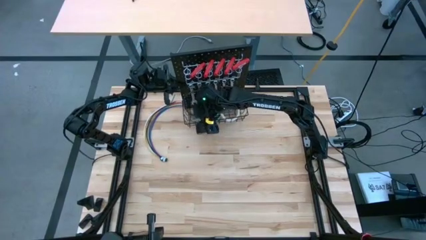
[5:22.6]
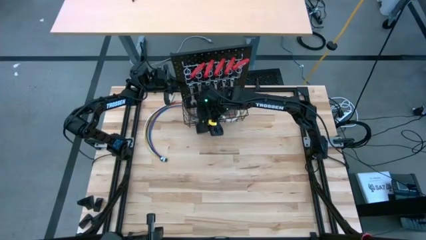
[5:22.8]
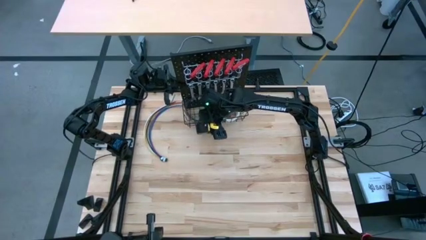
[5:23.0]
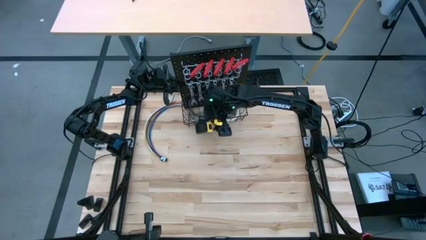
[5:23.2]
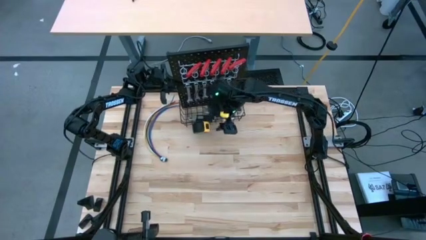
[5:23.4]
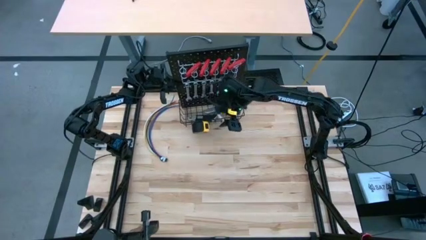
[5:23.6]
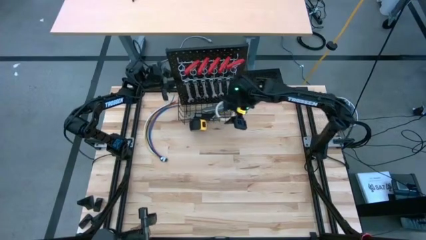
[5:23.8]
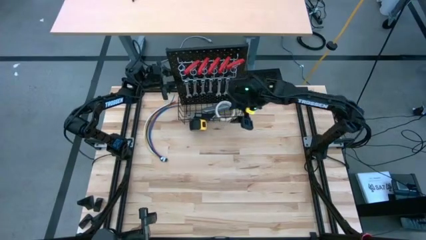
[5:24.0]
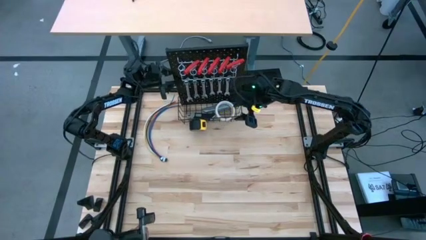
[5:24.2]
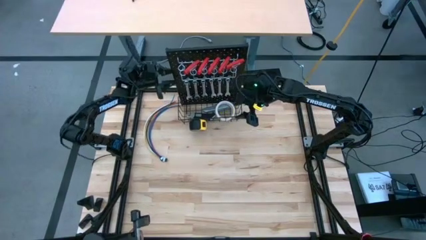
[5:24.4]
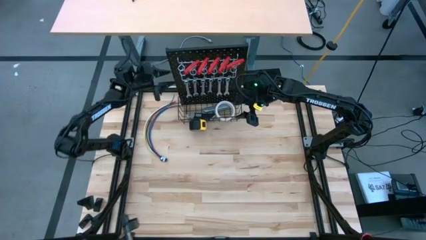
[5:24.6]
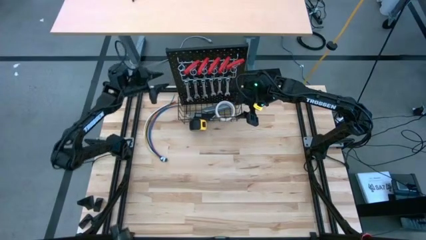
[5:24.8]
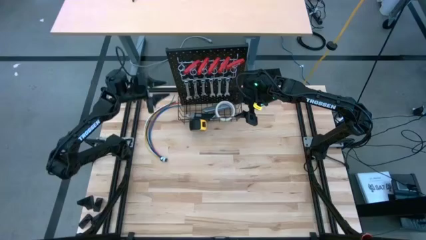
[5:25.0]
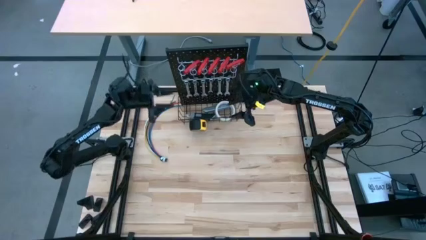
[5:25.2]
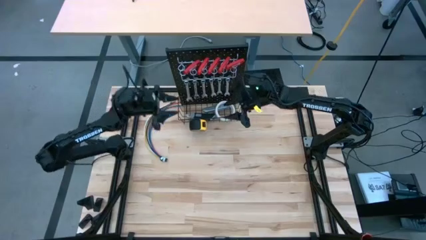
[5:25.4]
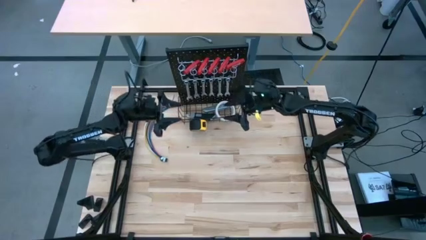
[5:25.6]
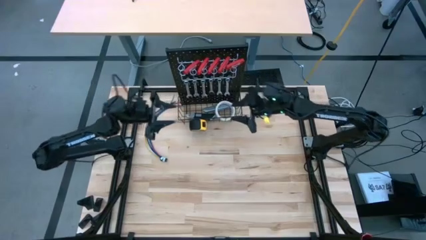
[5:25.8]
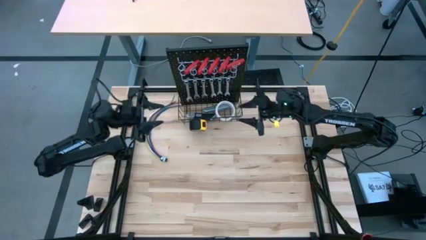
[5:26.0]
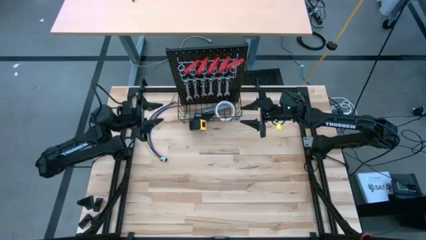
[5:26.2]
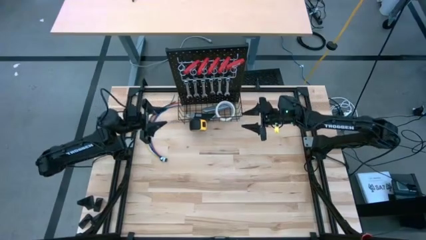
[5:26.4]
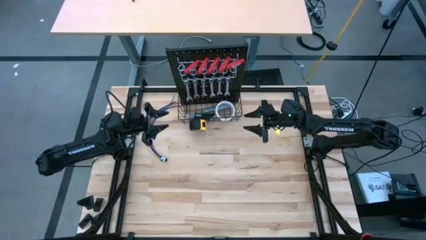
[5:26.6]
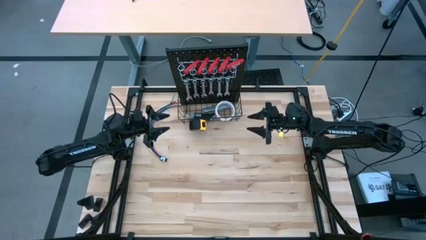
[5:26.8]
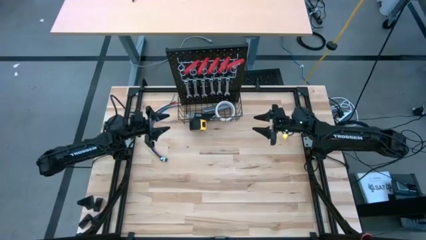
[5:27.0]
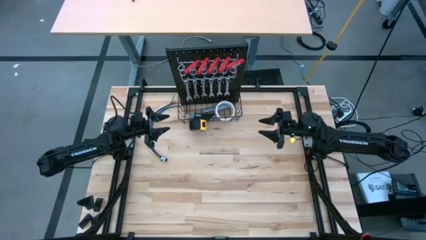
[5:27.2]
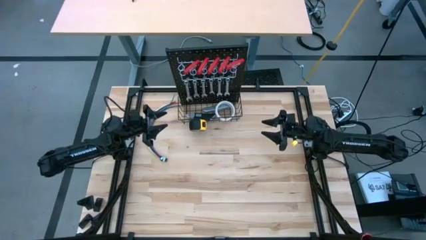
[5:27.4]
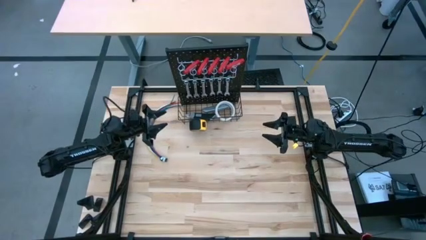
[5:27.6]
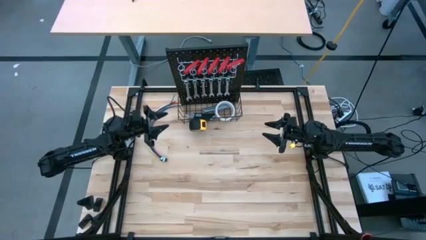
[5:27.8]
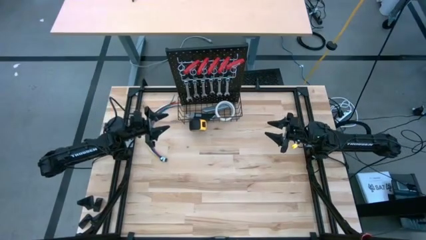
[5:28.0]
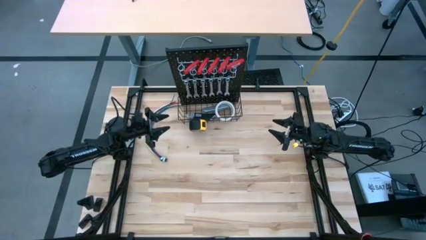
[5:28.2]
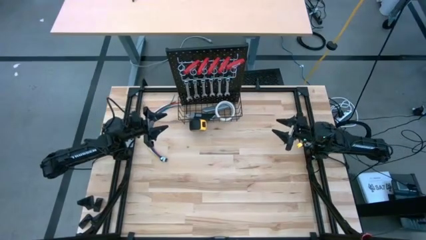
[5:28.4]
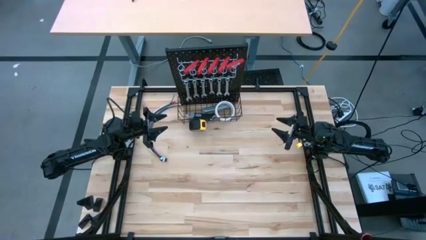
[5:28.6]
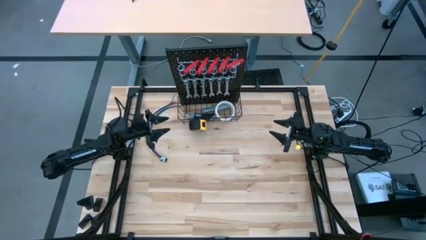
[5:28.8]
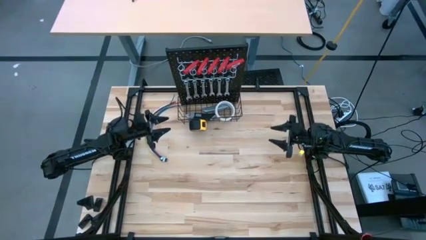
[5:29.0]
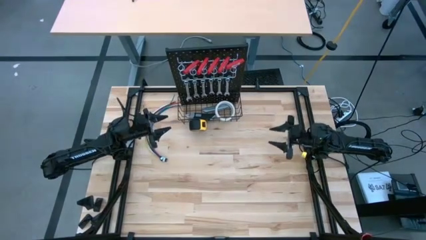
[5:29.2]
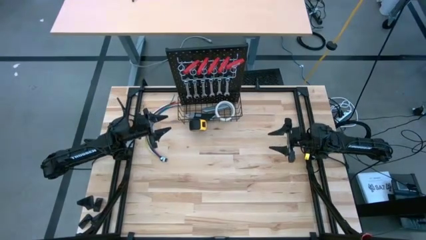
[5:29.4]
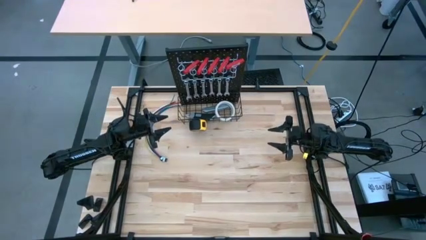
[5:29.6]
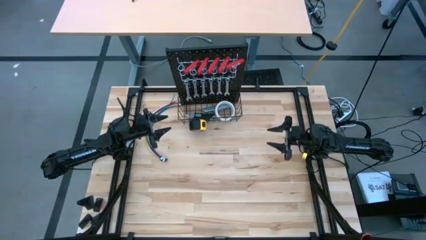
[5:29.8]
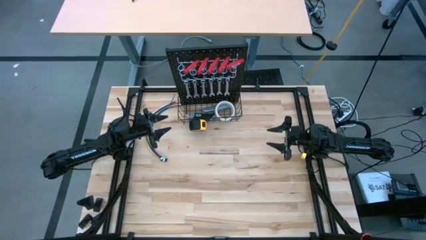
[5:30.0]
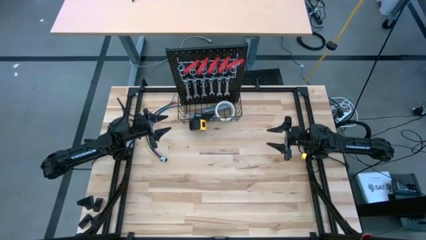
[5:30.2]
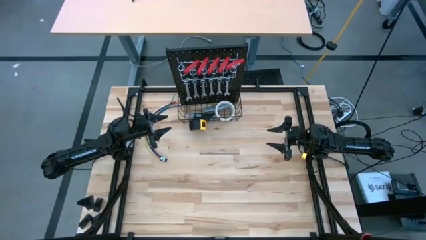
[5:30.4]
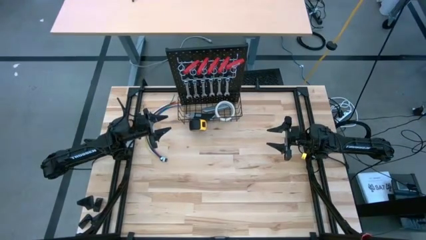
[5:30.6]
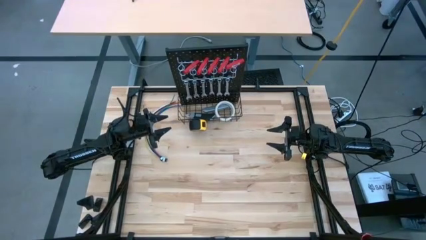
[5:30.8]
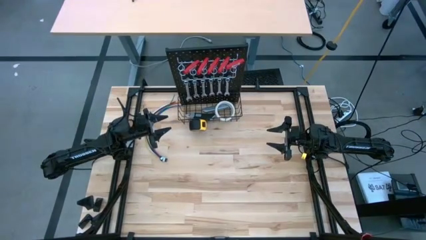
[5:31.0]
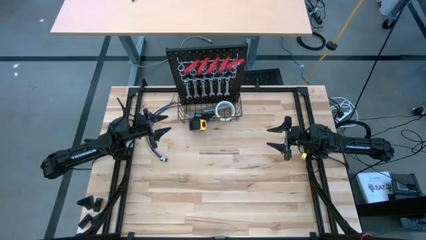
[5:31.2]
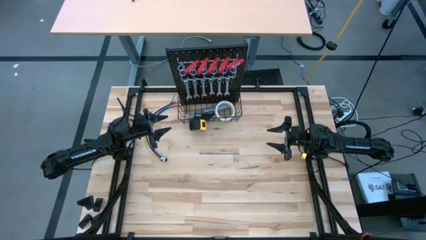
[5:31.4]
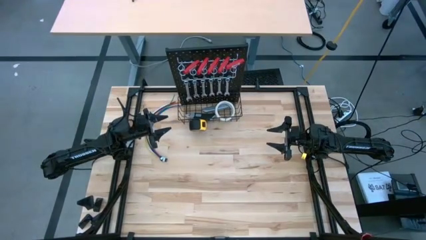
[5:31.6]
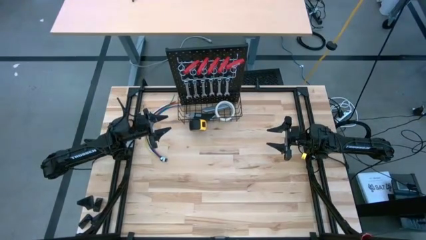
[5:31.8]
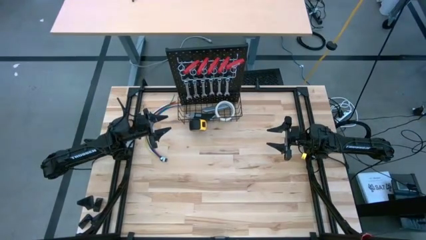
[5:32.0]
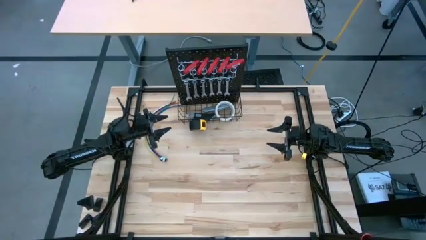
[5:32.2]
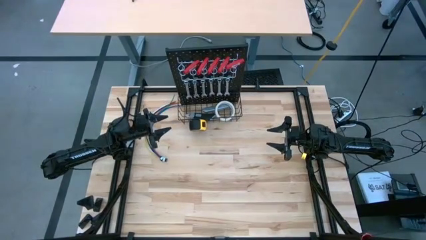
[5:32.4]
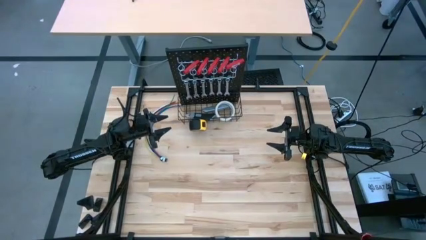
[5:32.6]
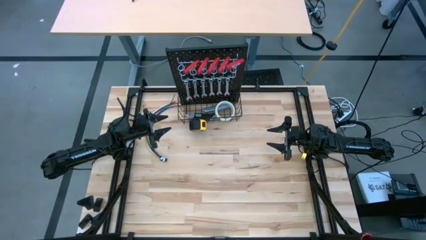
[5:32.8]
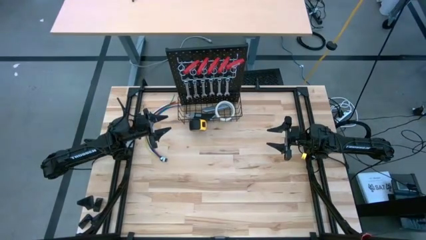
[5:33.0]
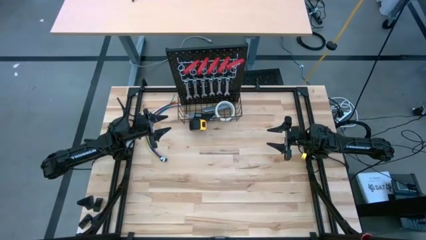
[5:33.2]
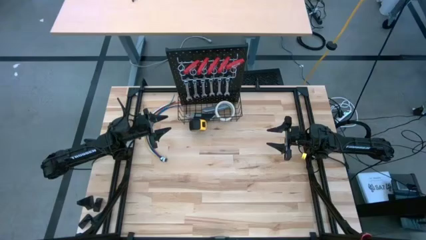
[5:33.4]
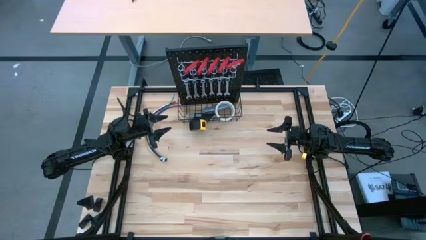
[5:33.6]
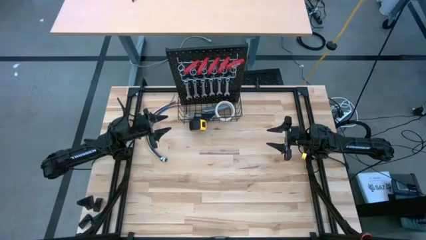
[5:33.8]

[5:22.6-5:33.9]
Task: Hang tools onto peg board
Return to Home Position

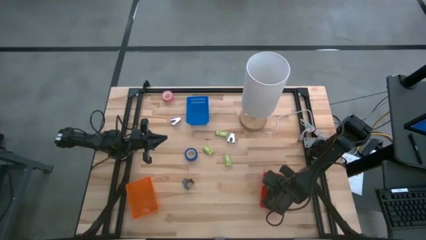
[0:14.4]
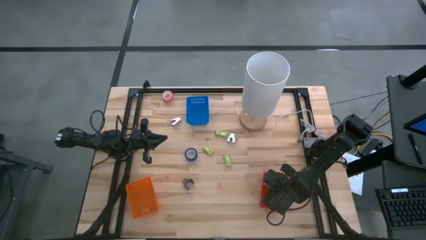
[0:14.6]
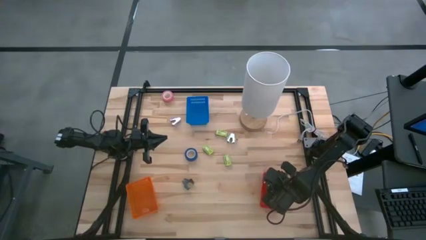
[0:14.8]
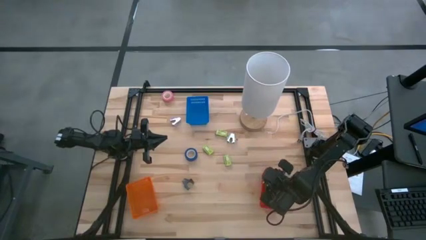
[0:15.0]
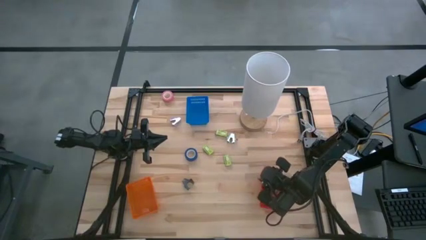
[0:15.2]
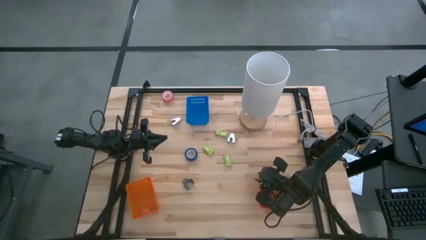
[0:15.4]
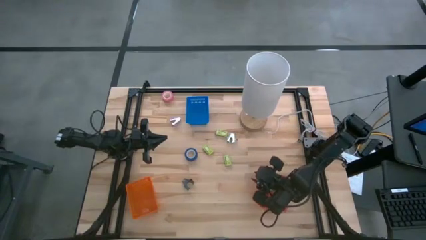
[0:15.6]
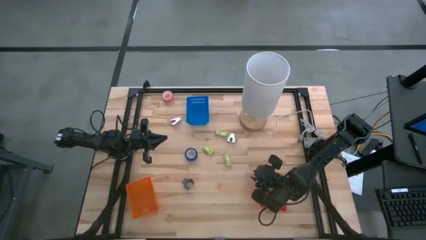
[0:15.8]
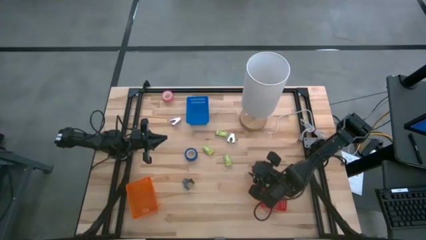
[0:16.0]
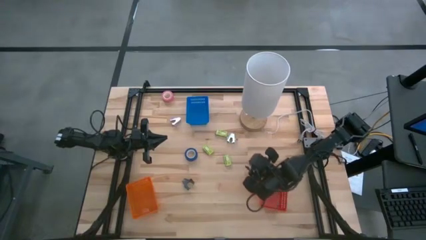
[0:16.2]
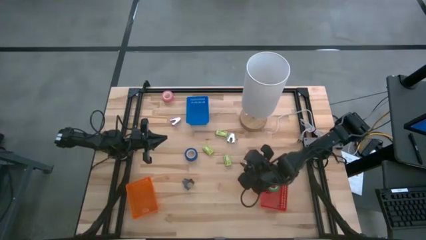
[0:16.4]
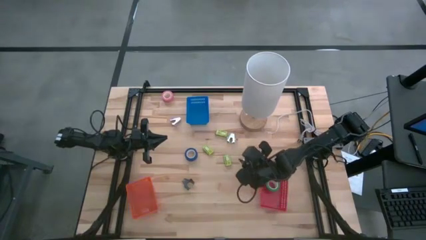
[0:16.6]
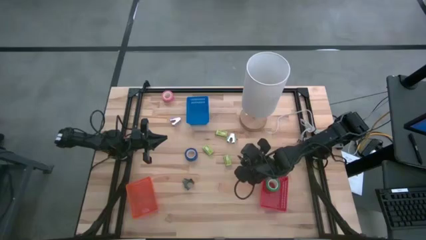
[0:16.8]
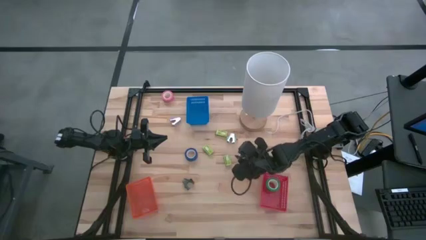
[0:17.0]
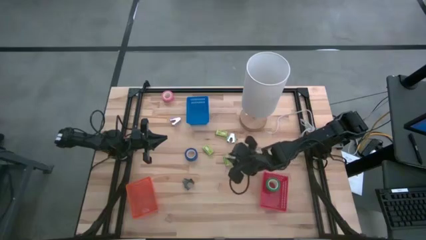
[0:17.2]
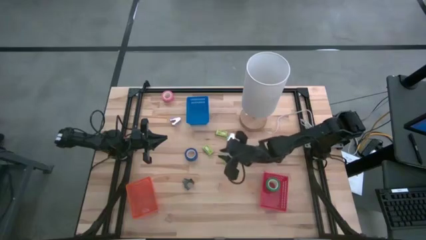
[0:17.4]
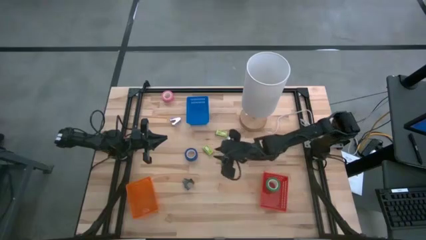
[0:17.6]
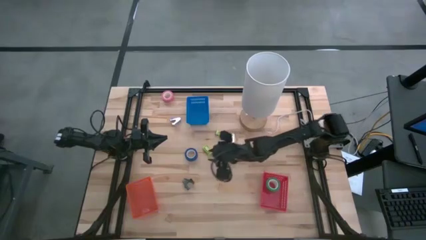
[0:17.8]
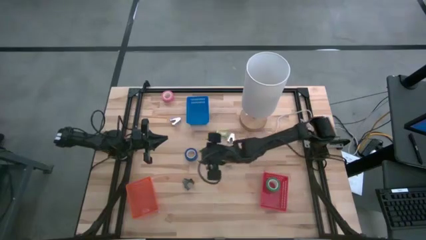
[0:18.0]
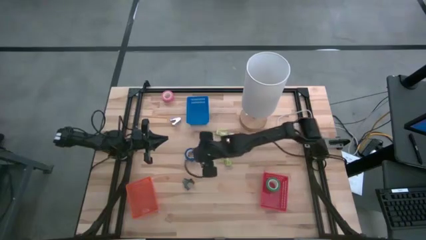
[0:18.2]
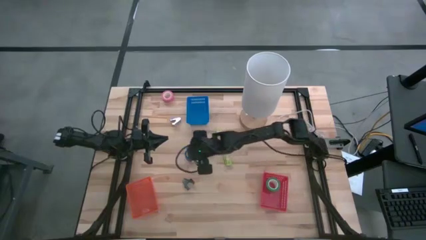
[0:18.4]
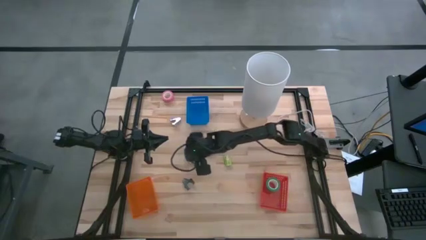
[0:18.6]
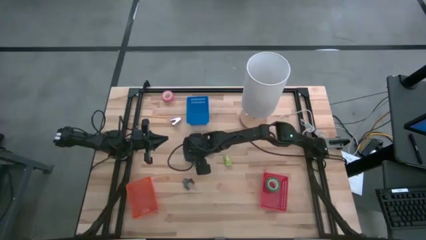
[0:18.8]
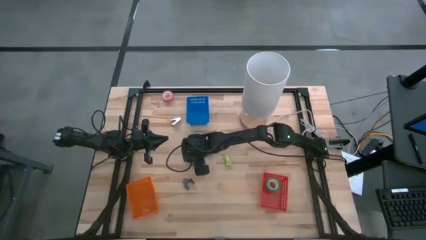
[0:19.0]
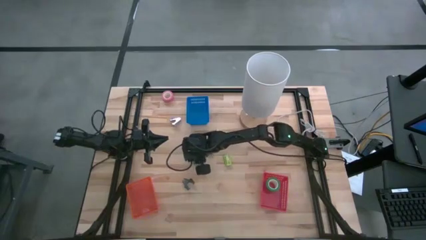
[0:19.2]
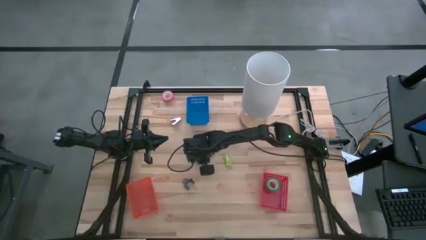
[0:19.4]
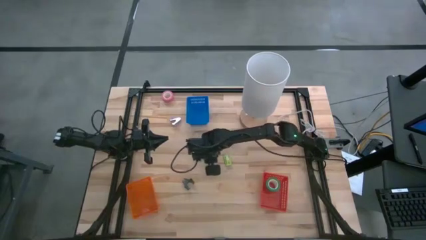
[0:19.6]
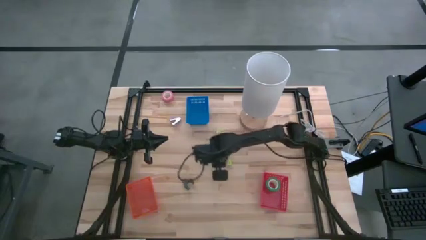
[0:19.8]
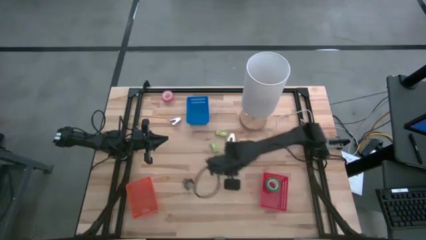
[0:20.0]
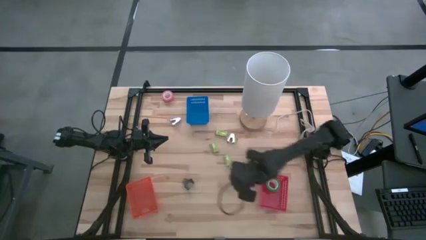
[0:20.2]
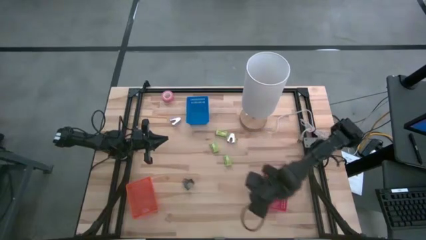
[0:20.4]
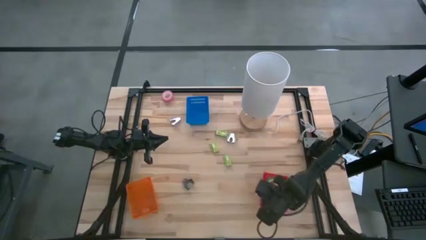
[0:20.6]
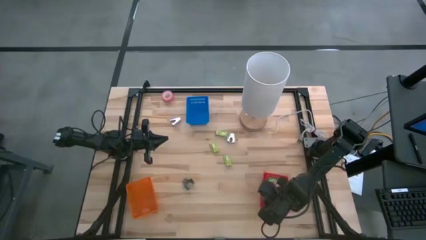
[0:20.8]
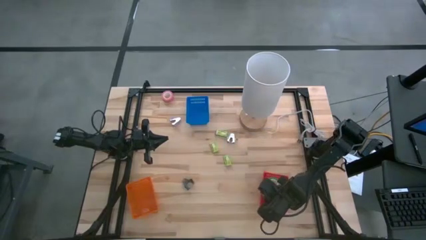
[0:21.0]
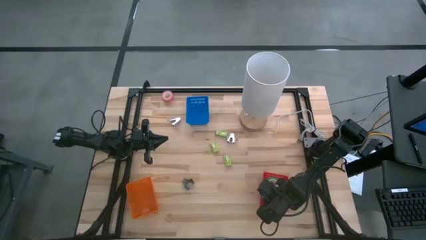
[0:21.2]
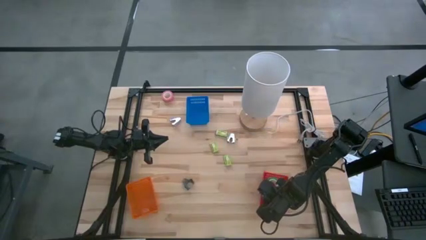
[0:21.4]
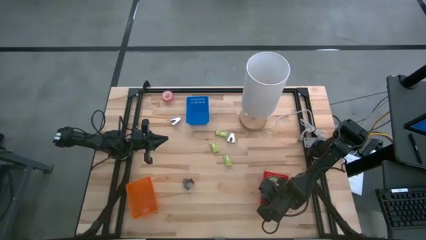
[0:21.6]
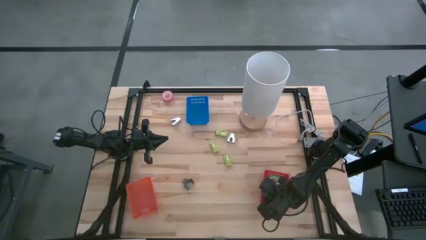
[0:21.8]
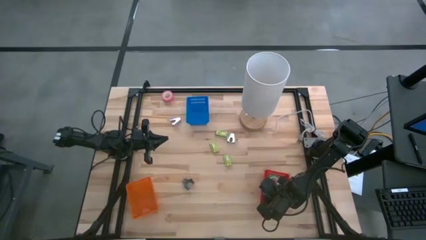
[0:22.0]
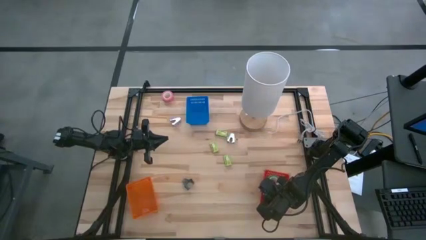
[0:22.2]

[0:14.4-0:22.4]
Task: Pick and place Stapler, Stapler remover, tape
Put the blue tape into the red bin
